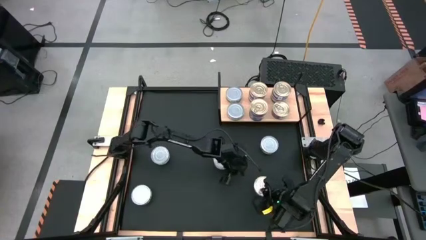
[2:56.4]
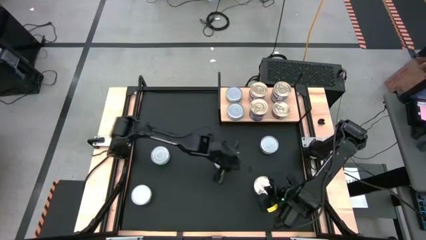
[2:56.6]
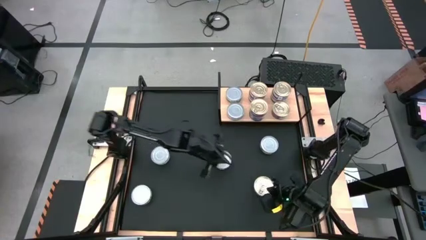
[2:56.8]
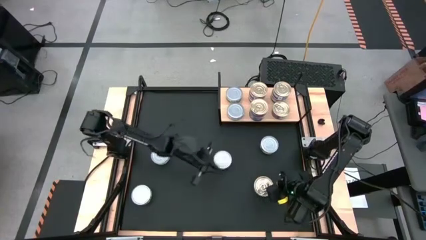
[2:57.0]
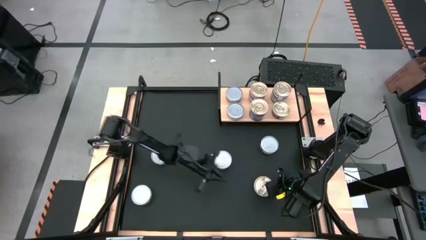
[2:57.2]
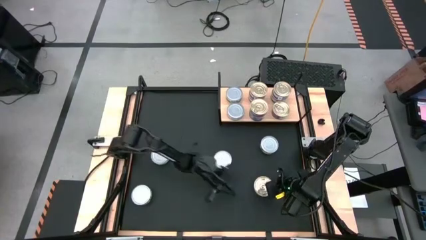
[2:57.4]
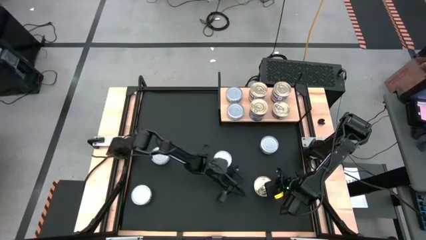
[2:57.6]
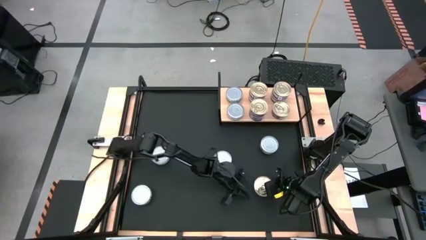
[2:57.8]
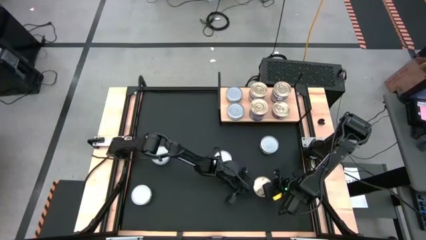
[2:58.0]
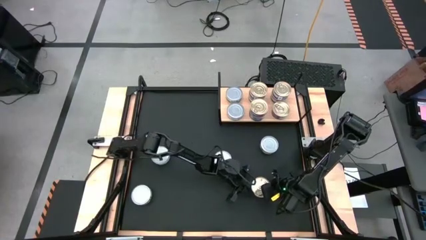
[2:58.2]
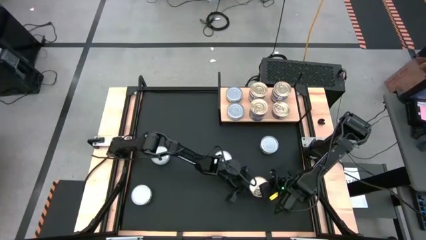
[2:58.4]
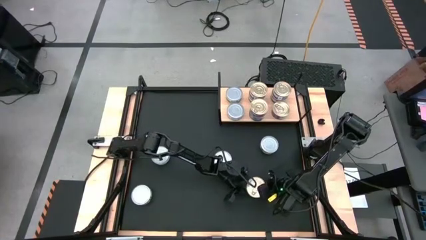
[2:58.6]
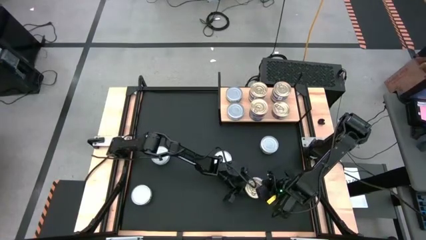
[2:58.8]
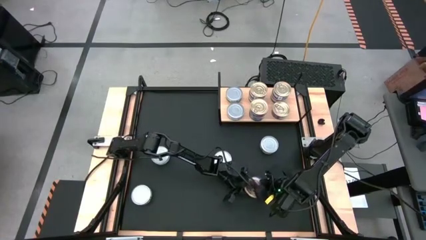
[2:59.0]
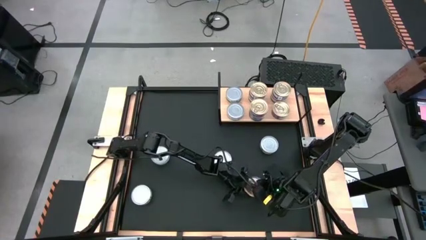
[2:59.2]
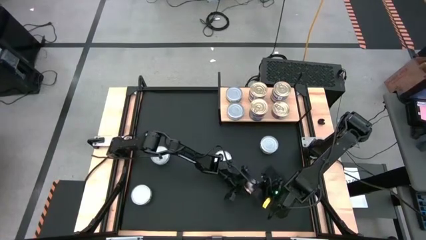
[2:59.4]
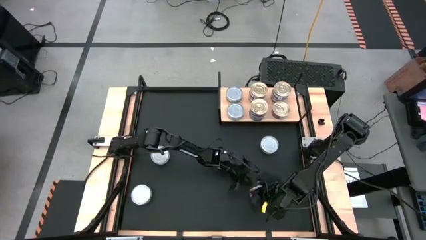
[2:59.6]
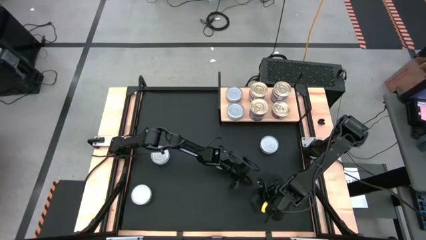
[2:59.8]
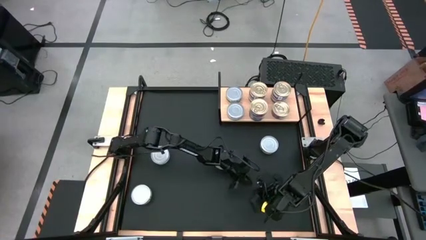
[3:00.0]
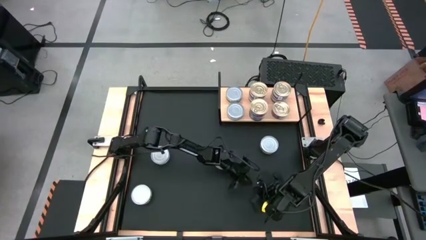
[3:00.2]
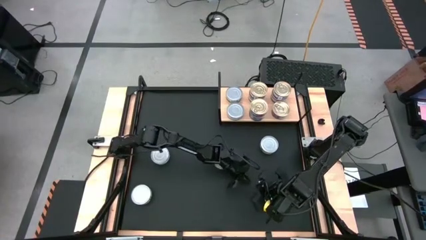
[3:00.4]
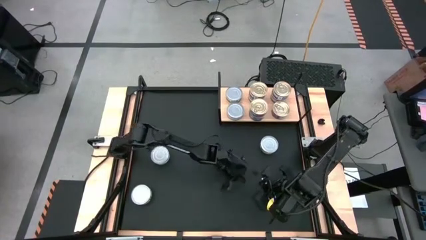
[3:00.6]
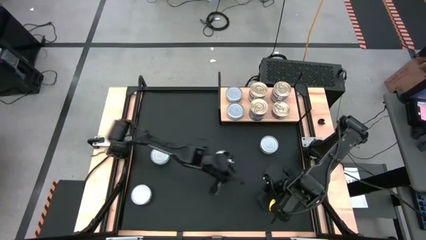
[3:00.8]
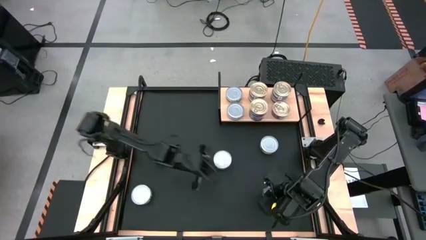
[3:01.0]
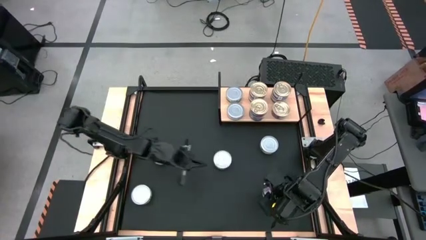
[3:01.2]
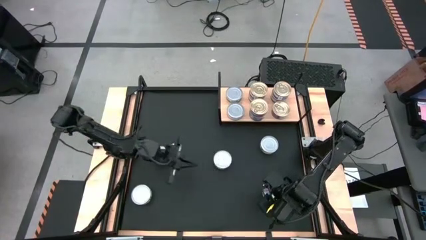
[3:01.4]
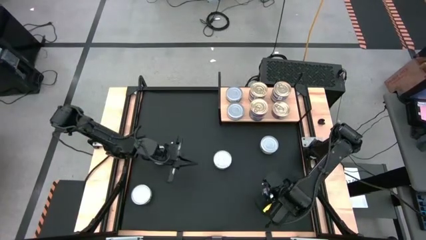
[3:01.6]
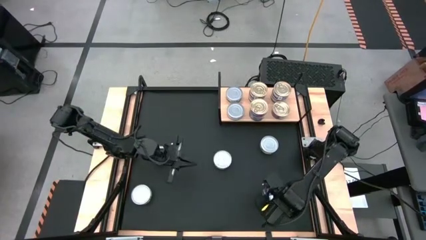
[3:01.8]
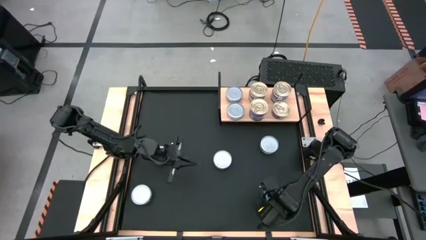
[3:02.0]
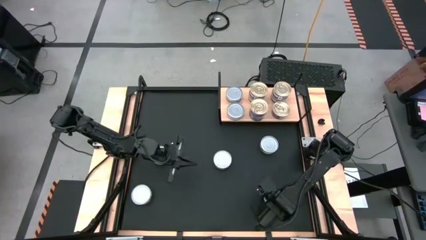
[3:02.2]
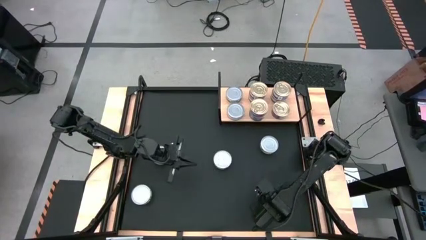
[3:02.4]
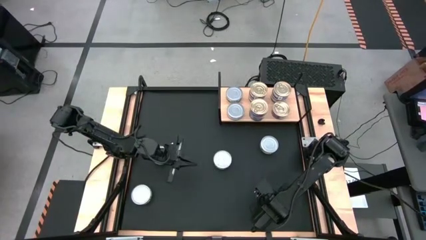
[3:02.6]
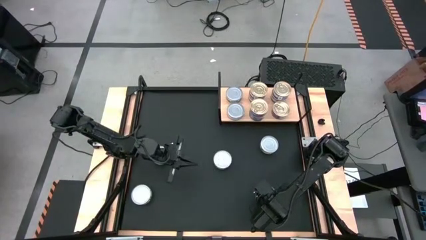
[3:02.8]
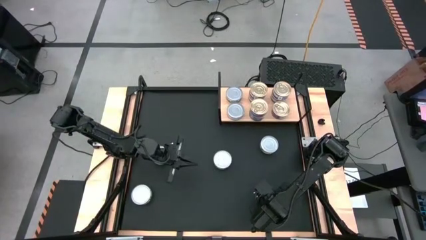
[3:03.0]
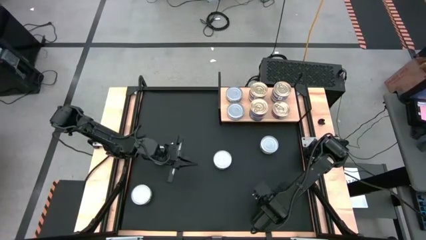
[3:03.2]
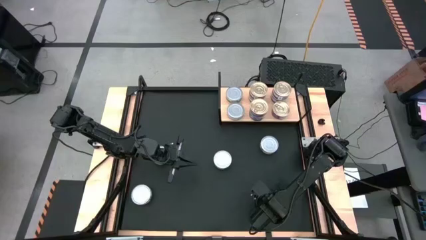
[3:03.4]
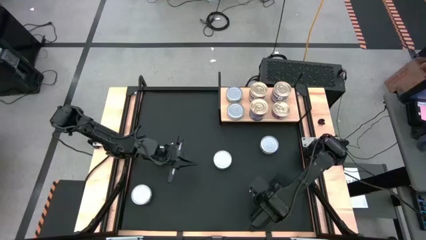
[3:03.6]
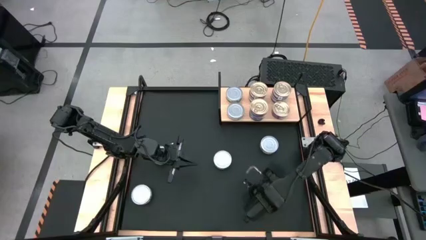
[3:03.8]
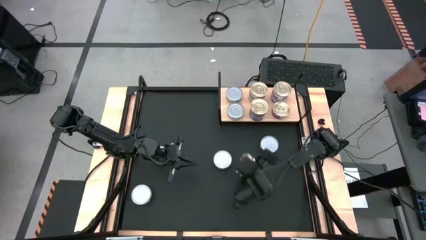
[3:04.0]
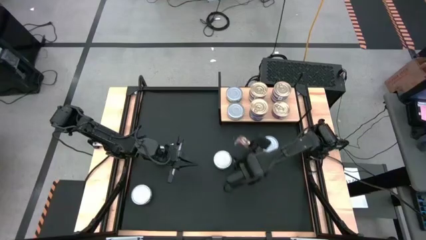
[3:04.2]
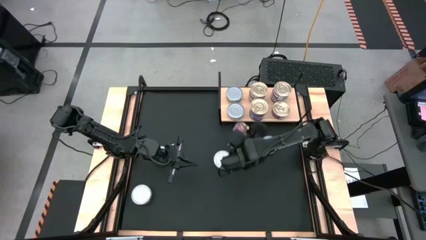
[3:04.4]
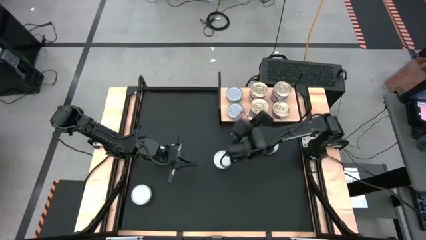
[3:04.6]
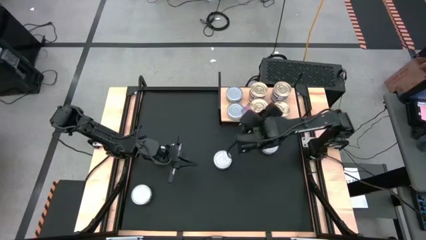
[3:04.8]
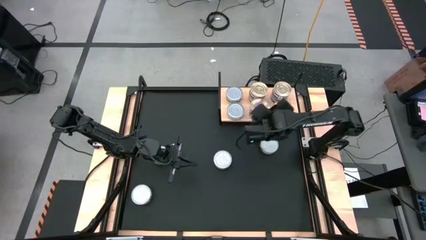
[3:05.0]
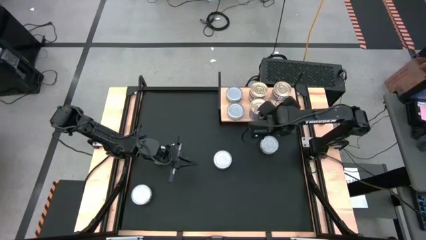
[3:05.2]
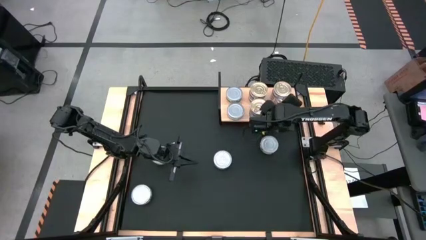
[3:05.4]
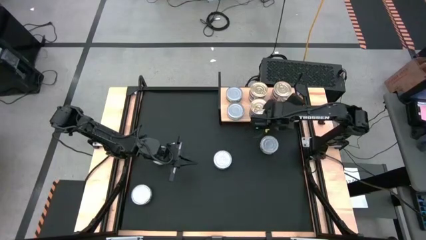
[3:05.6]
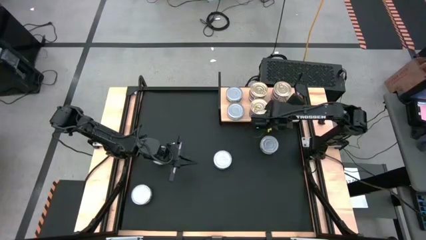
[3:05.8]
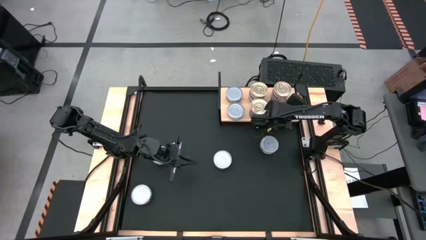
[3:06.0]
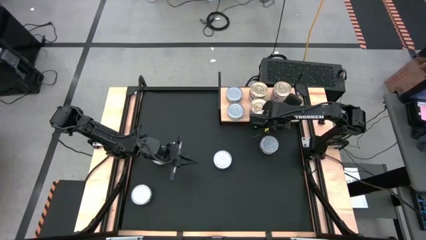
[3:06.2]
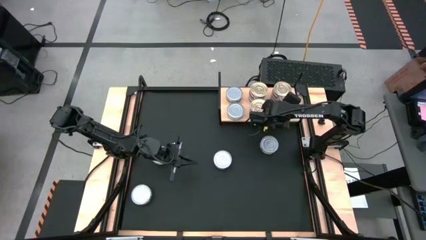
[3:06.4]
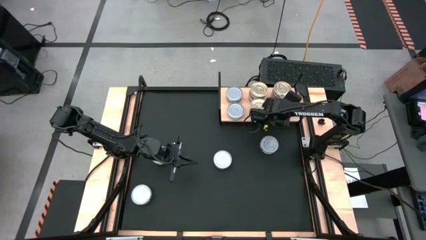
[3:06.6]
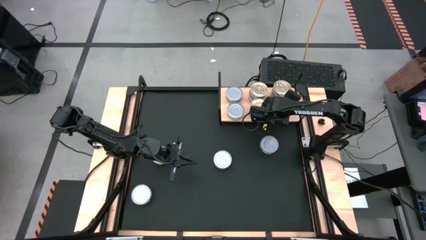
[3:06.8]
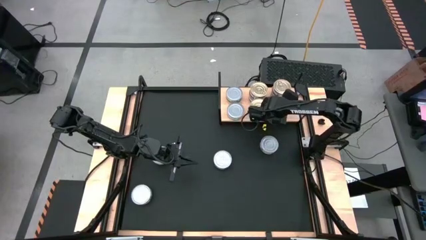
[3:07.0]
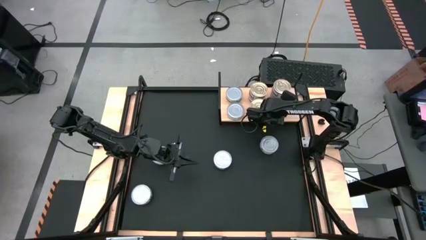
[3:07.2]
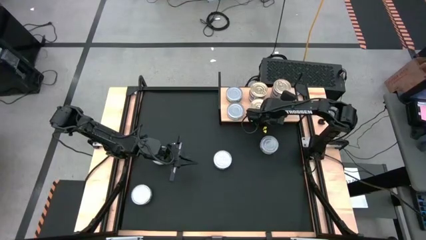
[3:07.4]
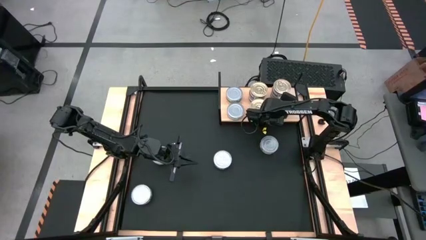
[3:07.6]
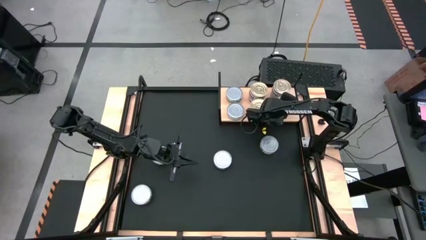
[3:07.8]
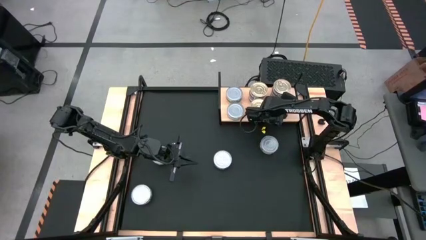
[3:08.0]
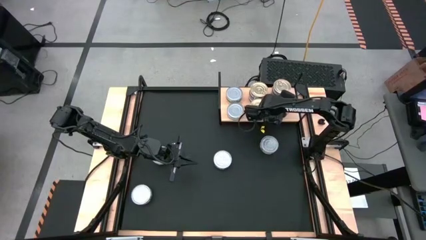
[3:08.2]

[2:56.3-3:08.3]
Task: Stack canned seafood by type on shelf
Stack the blue pink tuna can on top of the other blue pink tuna can on the shelf

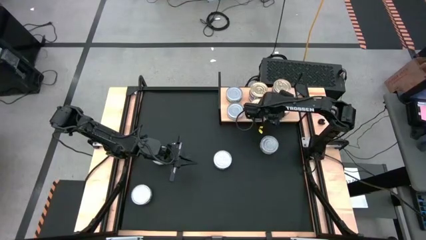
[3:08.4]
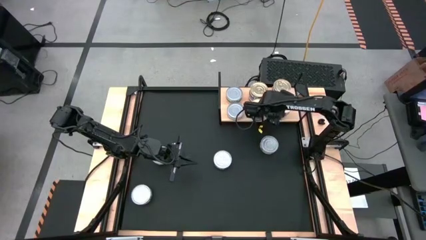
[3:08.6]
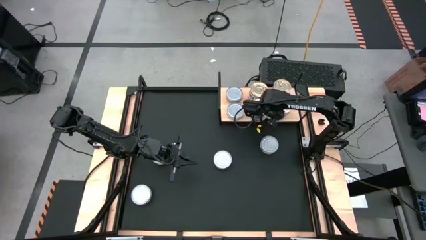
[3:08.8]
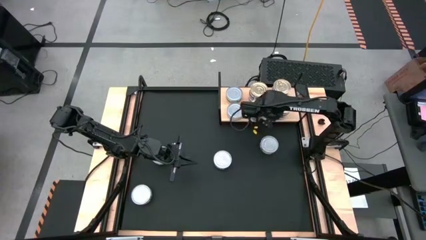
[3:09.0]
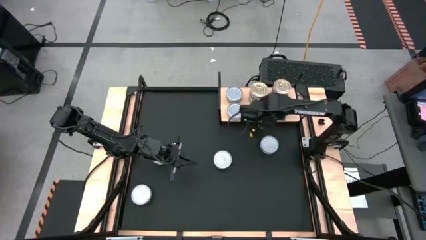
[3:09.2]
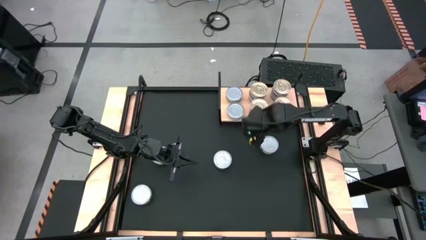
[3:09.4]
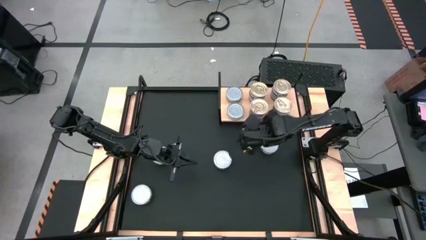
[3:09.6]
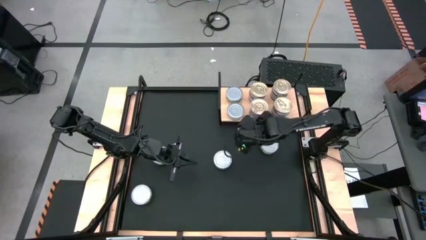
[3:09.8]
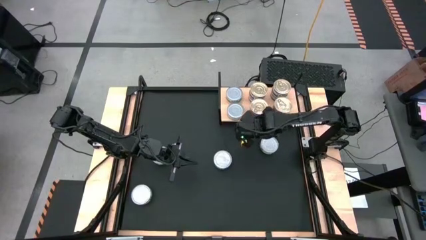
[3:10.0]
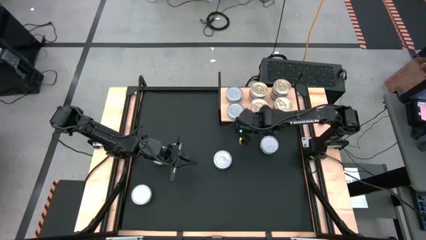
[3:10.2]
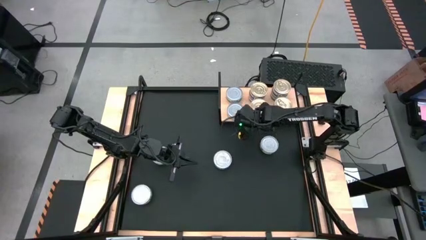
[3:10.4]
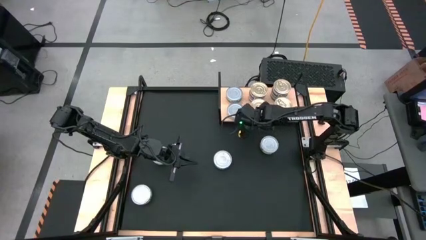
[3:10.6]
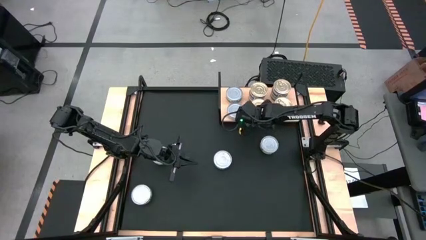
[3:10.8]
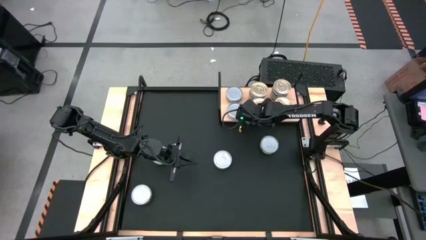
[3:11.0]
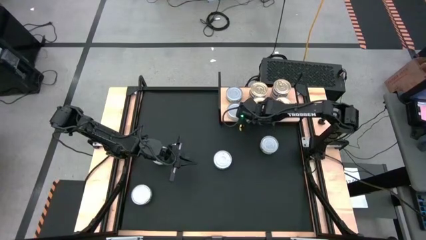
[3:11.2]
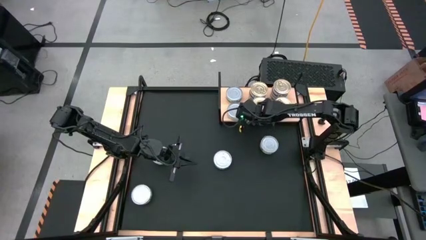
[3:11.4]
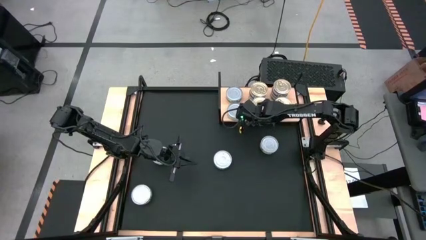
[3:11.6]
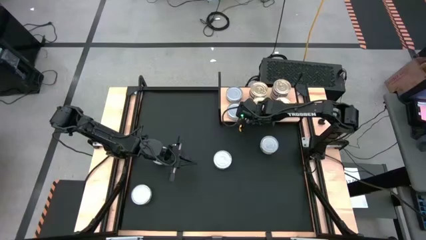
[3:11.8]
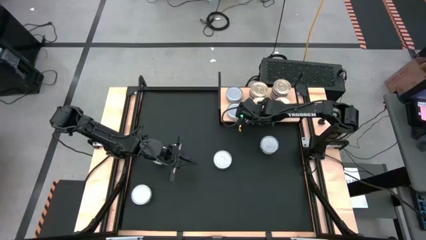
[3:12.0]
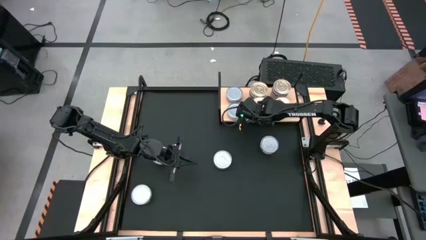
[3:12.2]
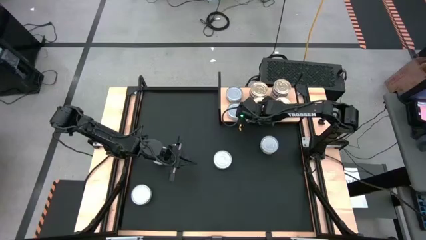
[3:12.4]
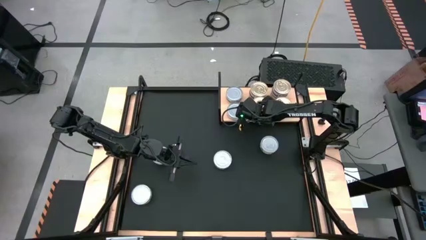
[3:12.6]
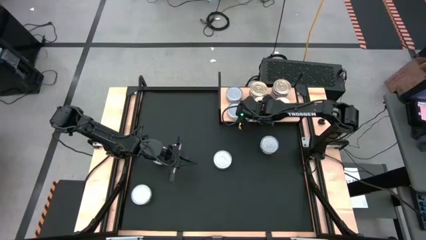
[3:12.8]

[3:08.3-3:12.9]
Adjust the stacked blue pink tuna can on the shelf
